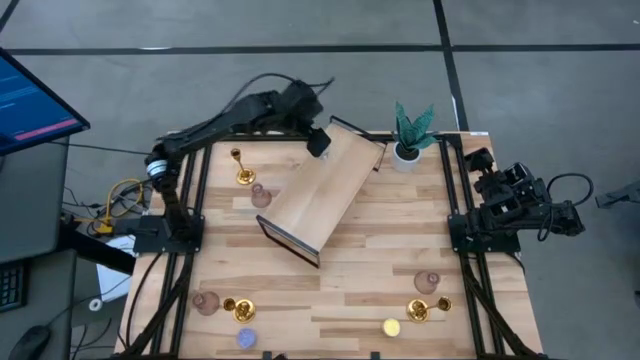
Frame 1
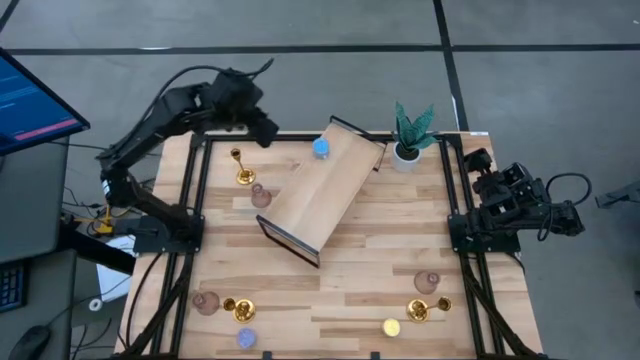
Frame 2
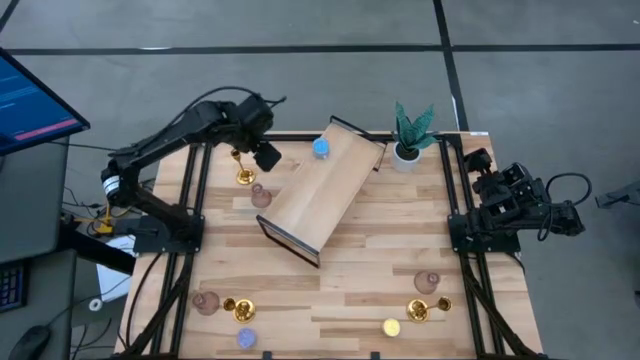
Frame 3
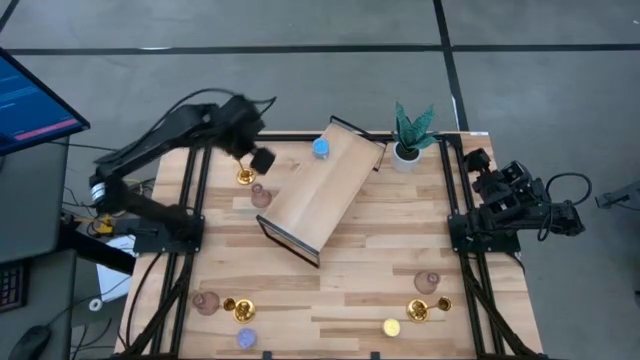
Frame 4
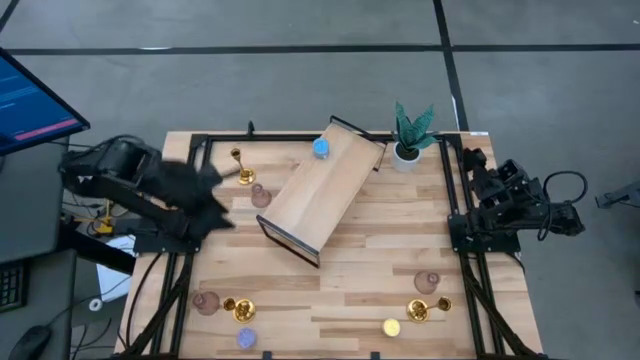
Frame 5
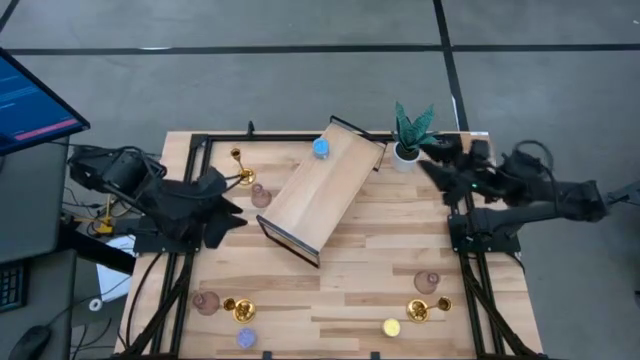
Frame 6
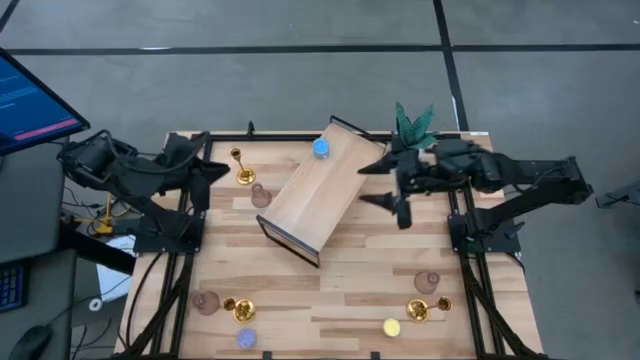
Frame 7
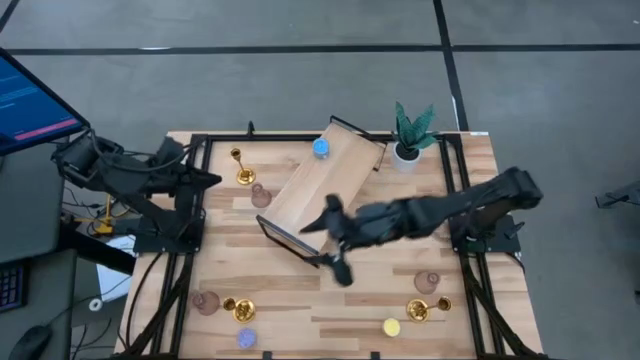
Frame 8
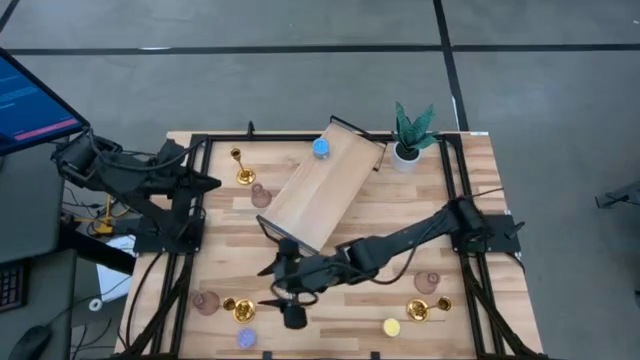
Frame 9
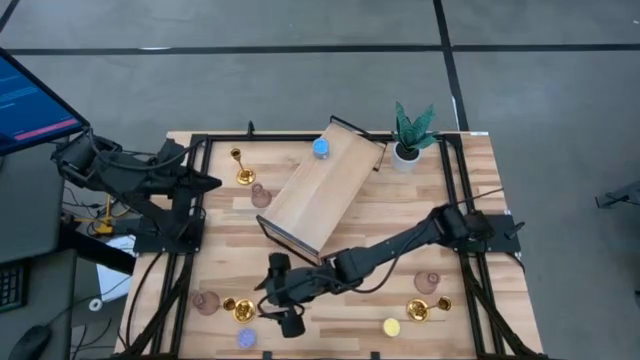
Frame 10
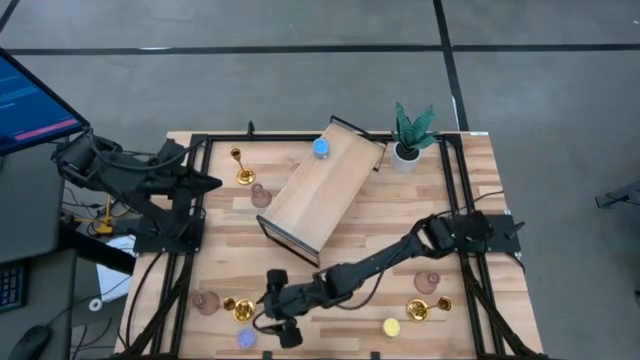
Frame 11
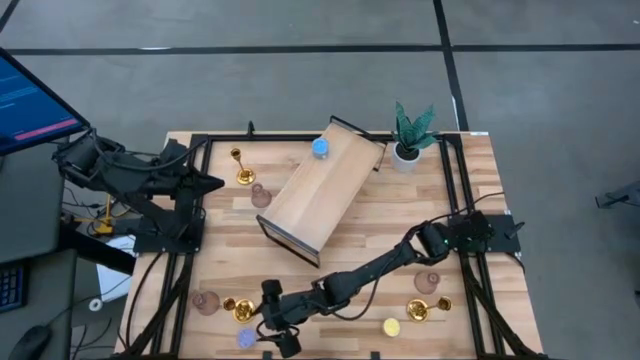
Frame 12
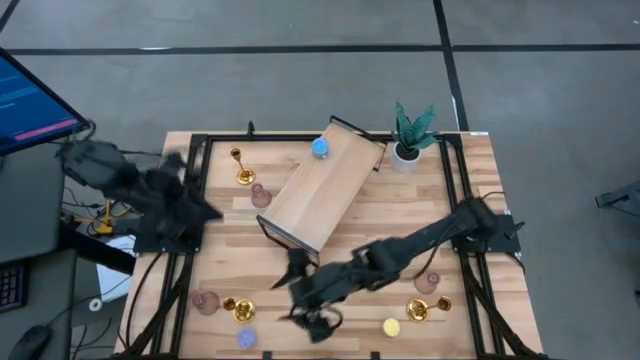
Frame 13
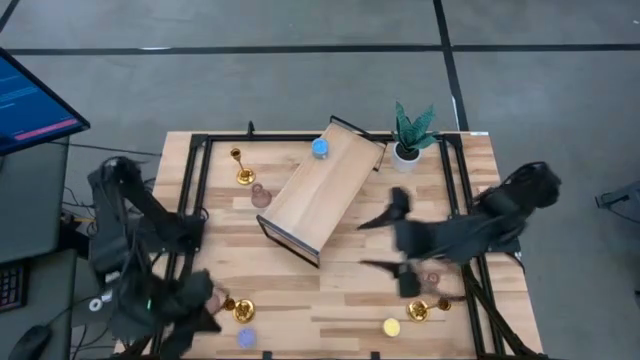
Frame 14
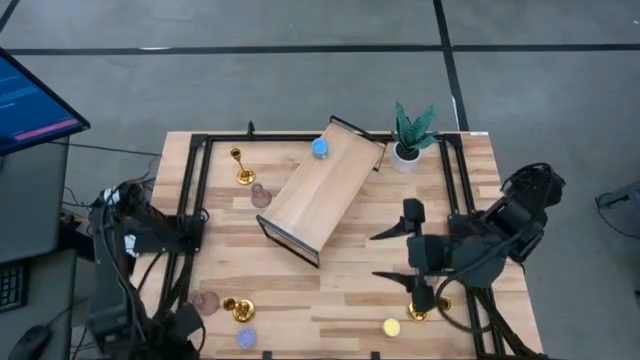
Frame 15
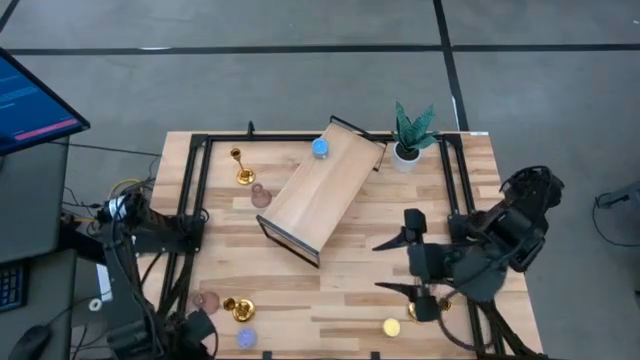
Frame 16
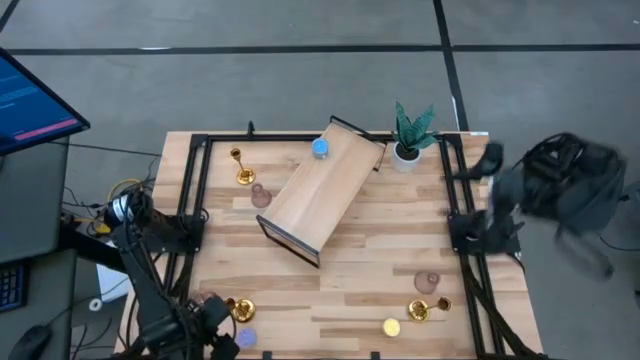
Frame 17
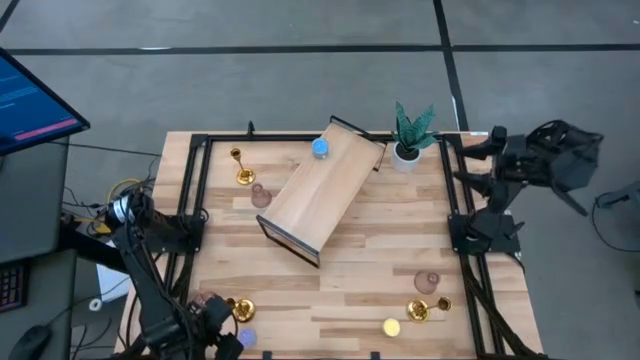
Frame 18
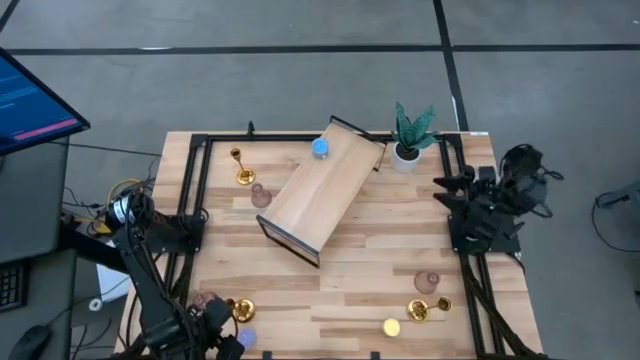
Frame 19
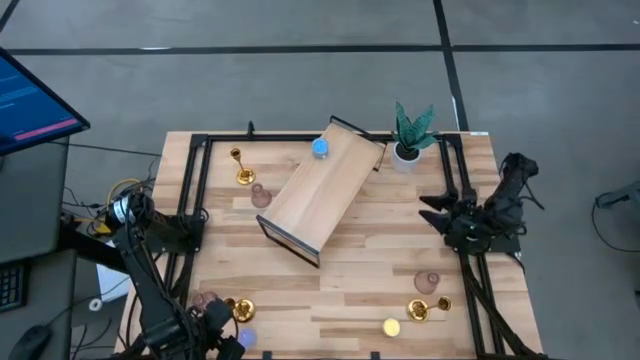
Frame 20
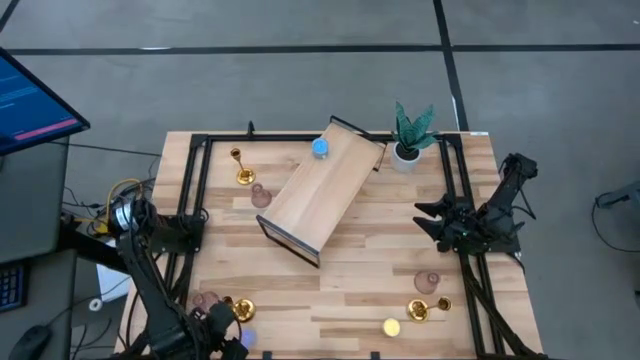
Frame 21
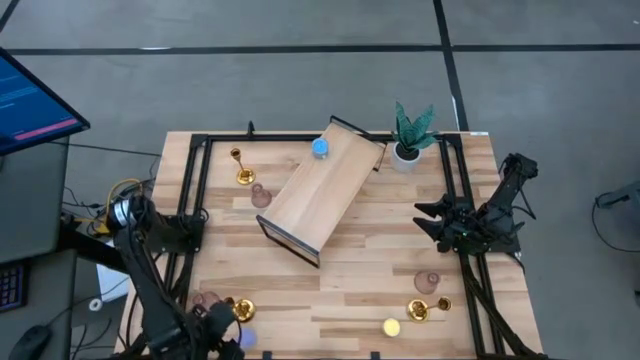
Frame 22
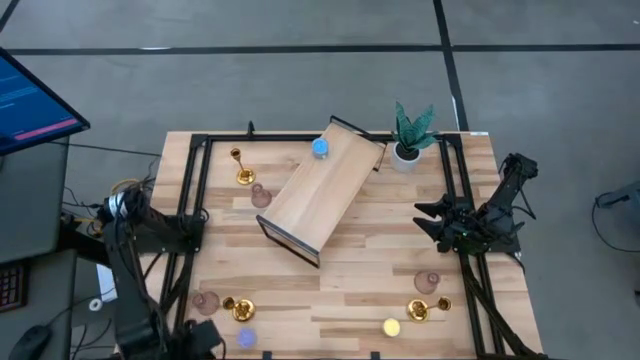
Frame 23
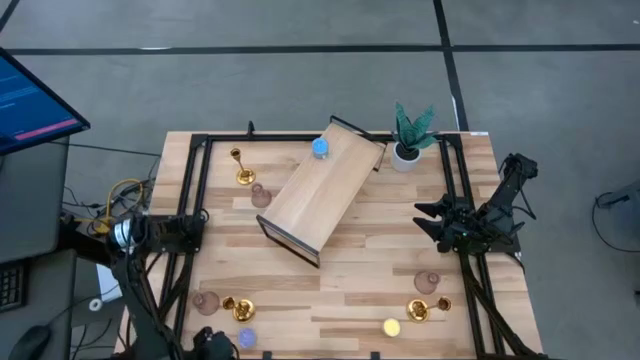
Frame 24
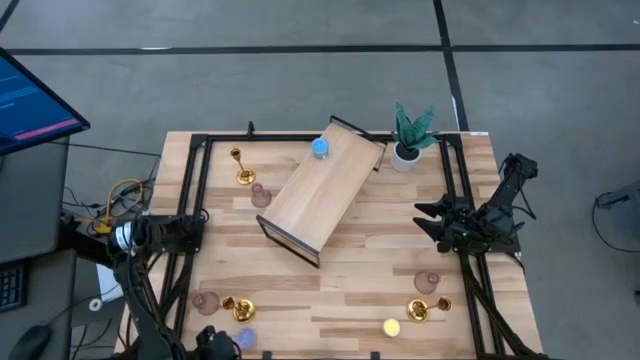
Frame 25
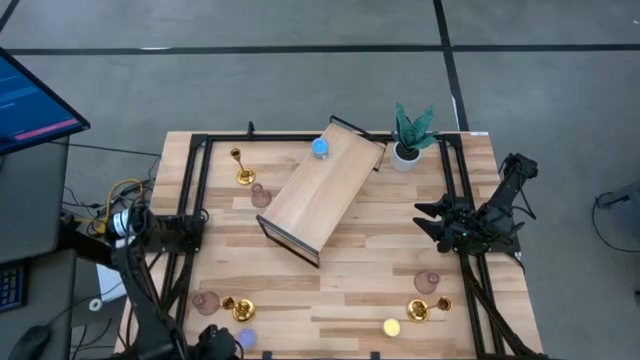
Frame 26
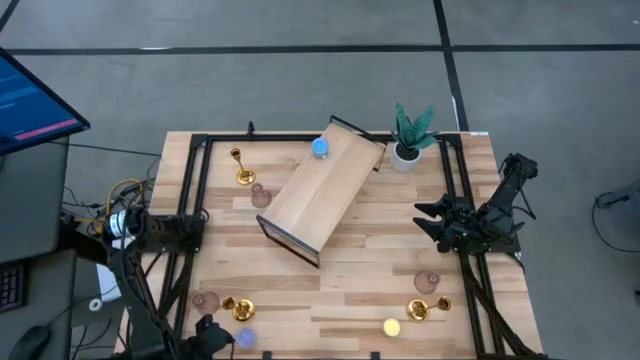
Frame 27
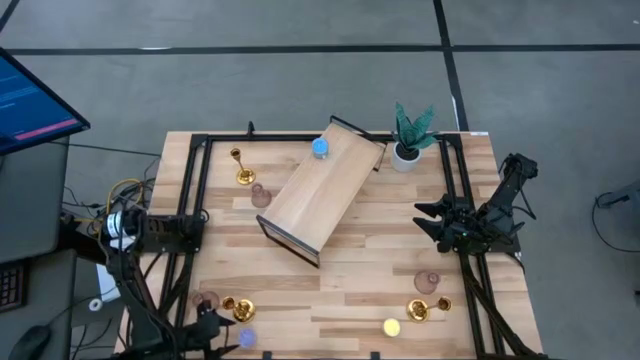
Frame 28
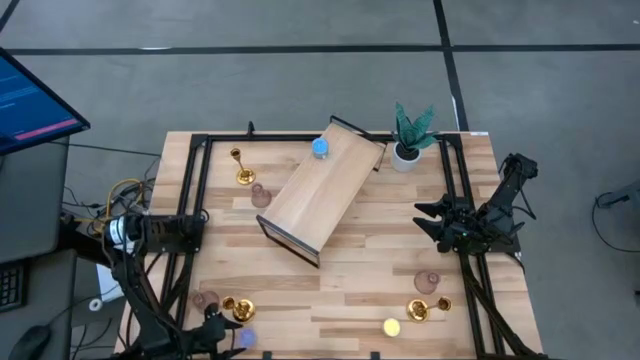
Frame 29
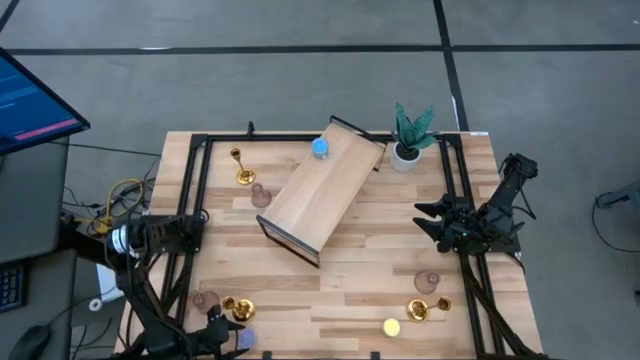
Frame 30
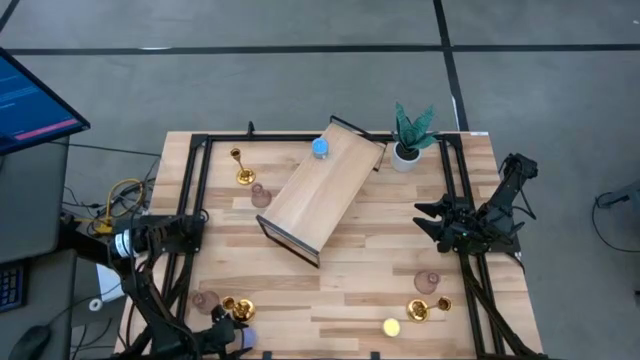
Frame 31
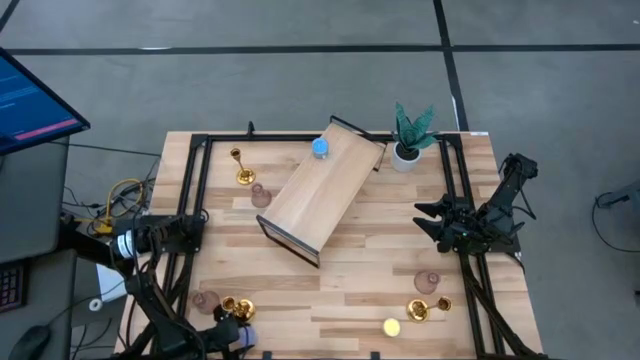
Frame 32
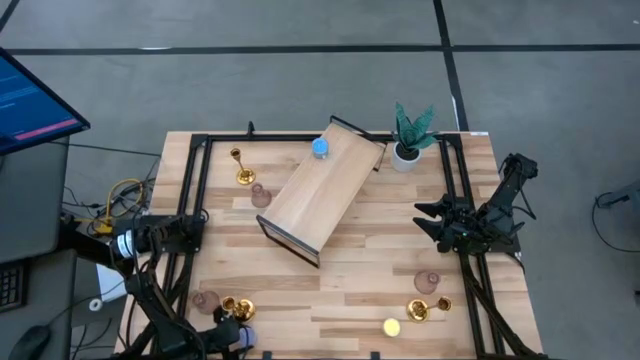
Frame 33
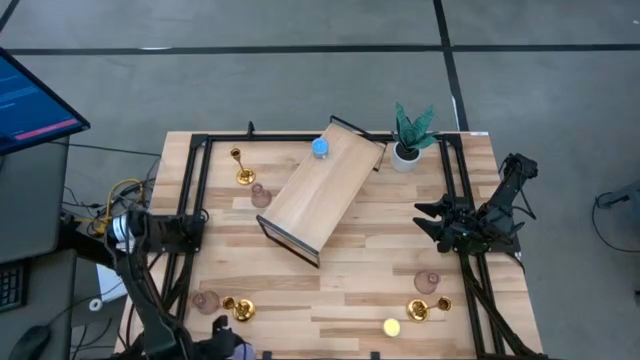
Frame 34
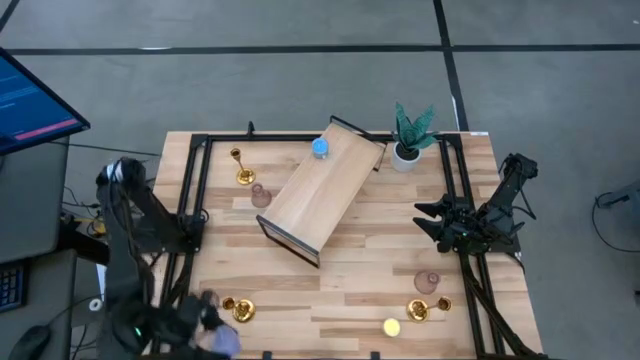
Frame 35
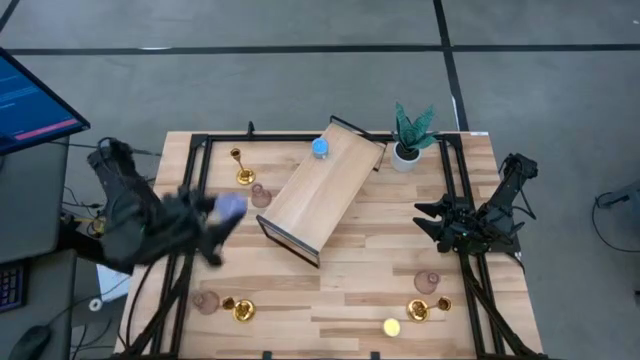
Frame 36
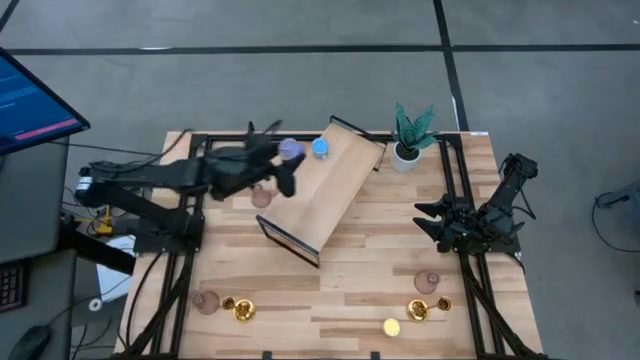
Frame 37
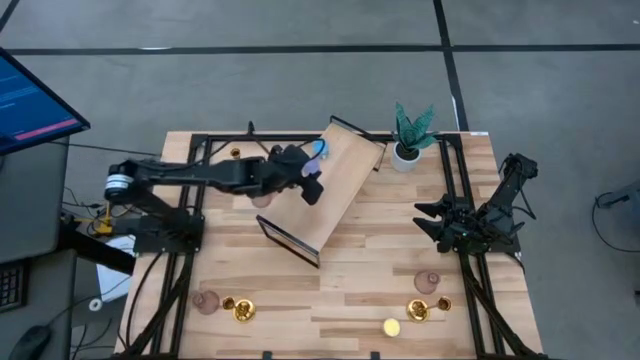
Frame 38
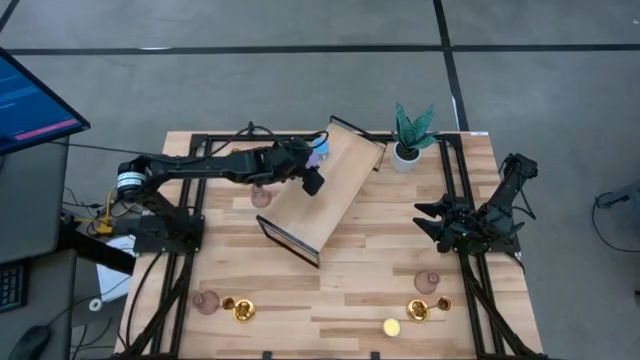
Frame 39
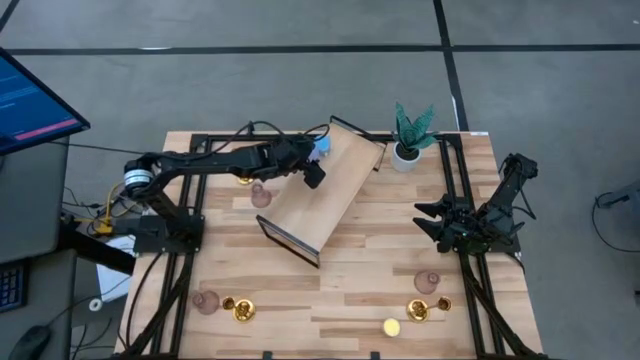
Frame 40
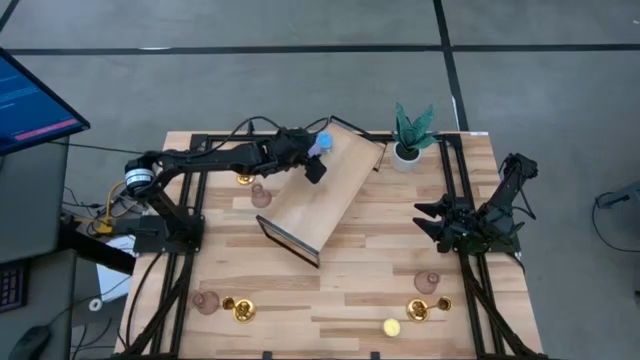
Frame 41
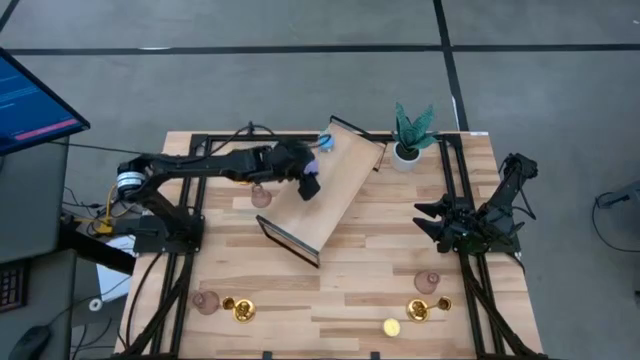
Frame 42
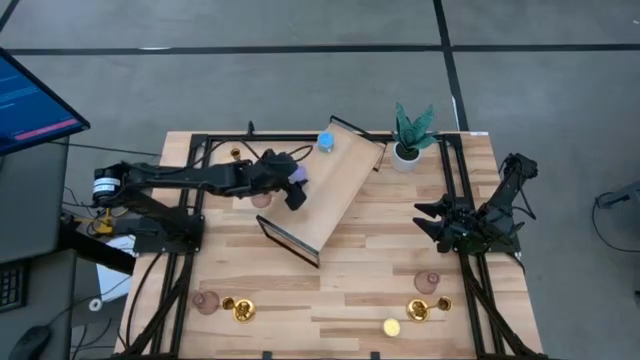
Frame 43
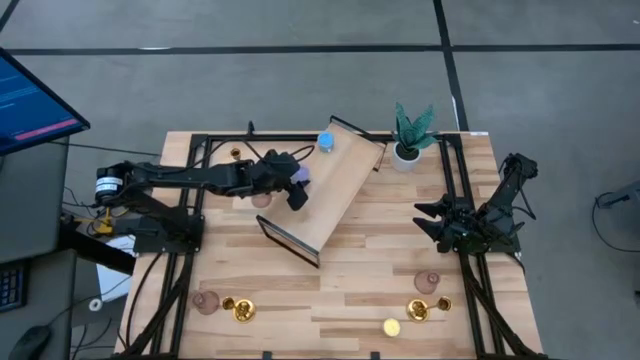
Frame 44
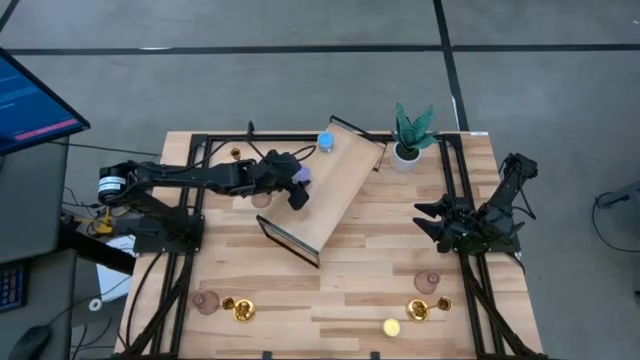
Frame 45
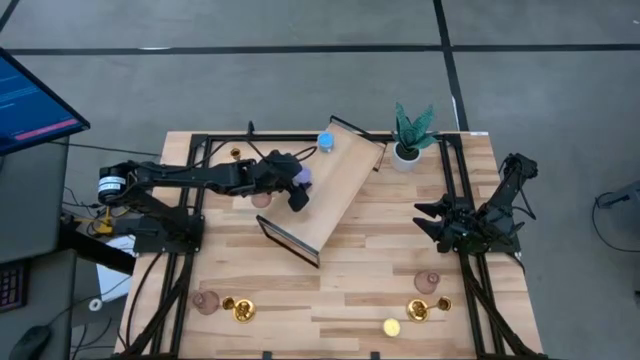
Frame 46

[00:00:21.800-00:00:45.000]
Task: Pick & Place candle stick holders
Put the purple candle on the shelf
